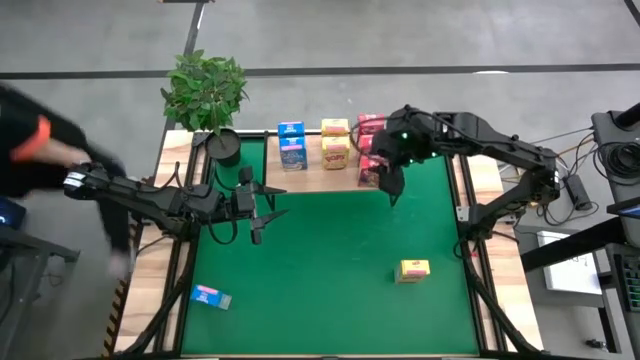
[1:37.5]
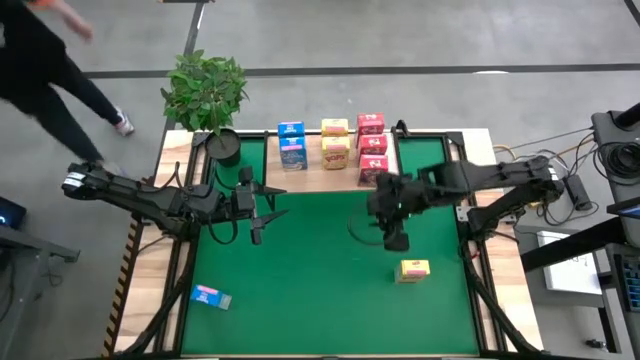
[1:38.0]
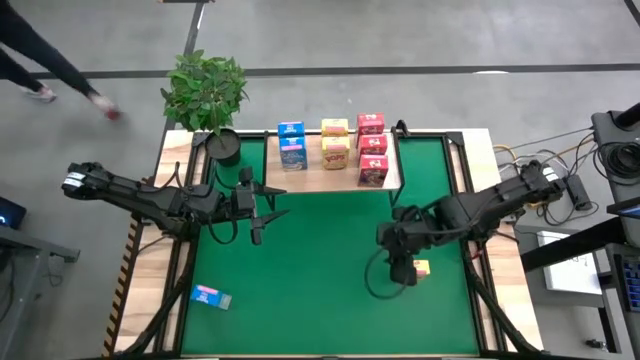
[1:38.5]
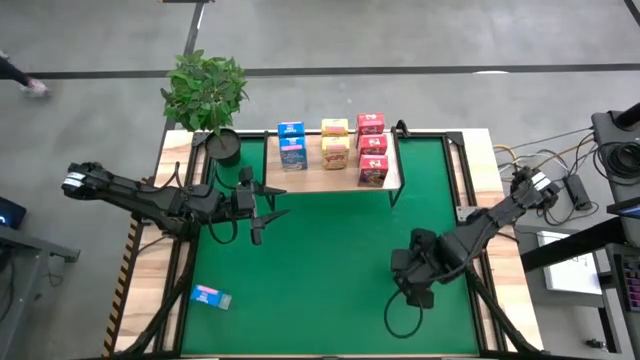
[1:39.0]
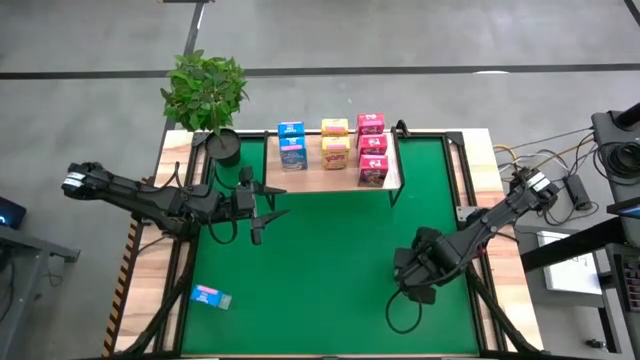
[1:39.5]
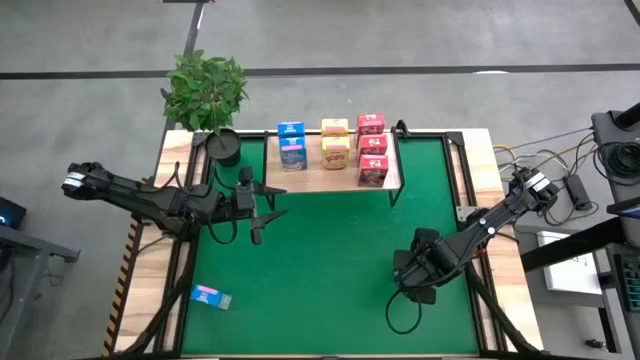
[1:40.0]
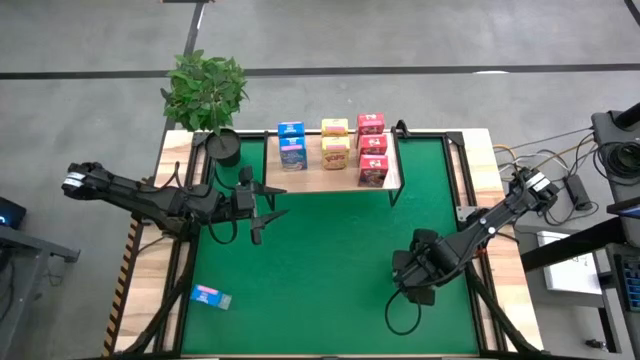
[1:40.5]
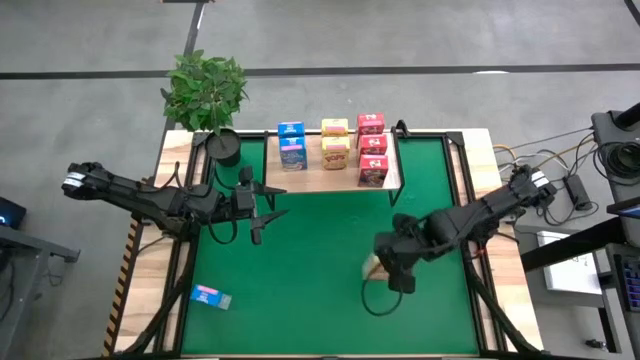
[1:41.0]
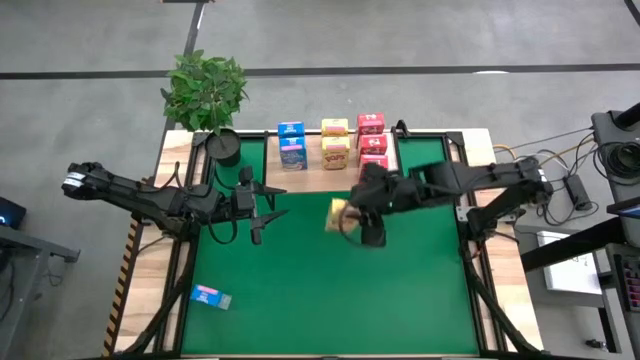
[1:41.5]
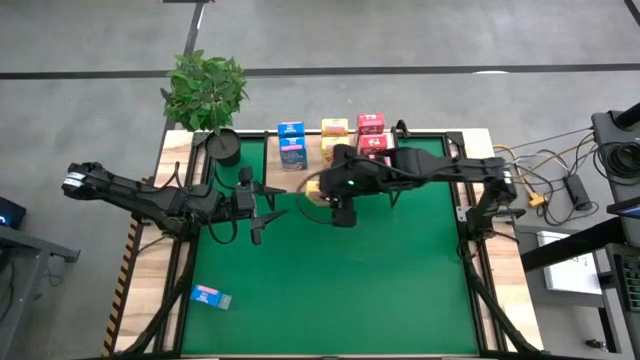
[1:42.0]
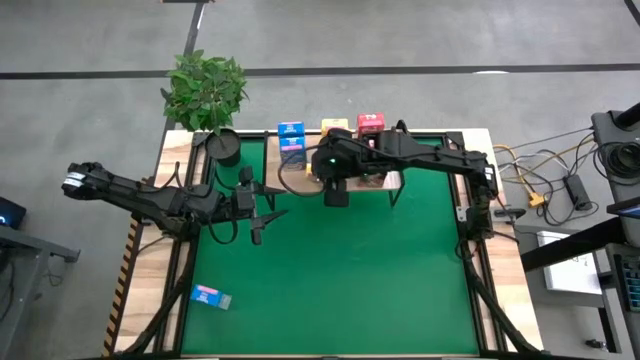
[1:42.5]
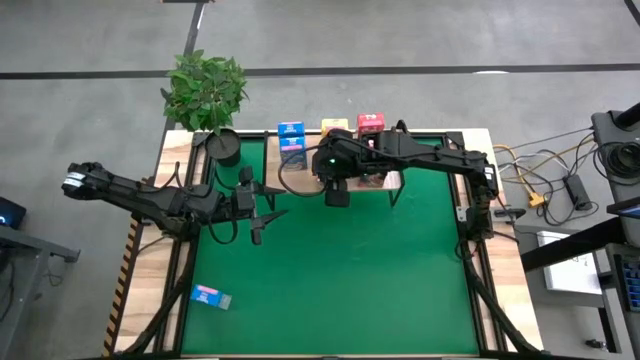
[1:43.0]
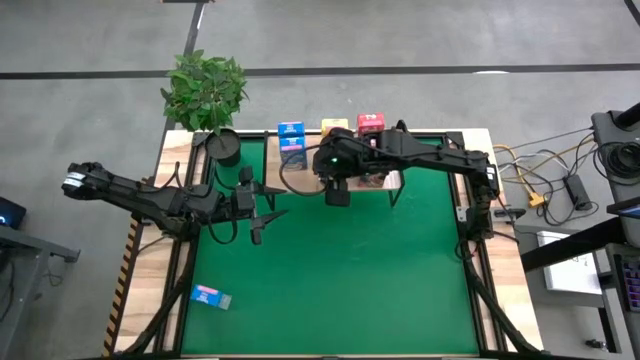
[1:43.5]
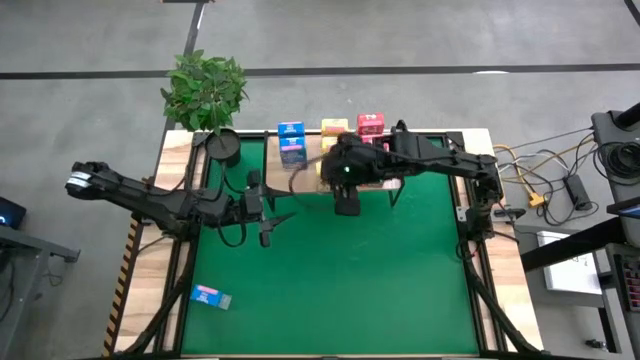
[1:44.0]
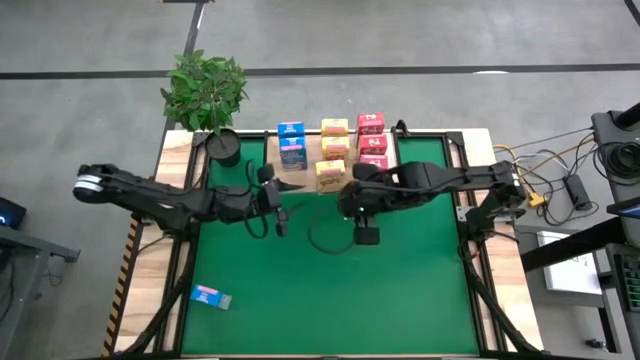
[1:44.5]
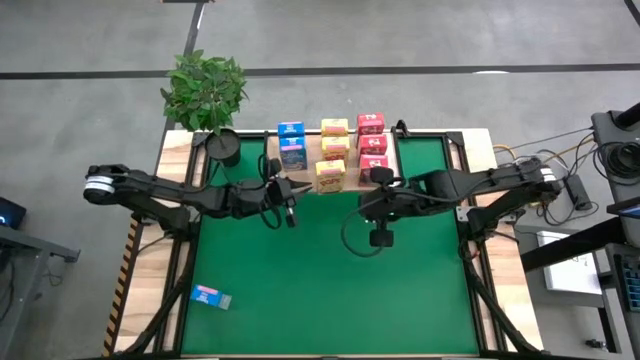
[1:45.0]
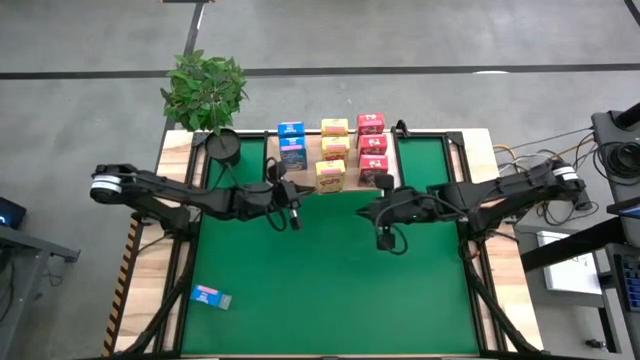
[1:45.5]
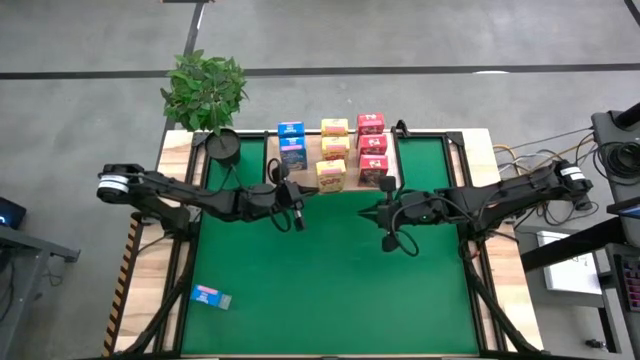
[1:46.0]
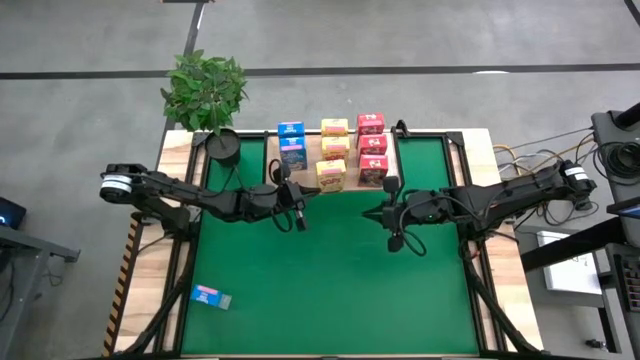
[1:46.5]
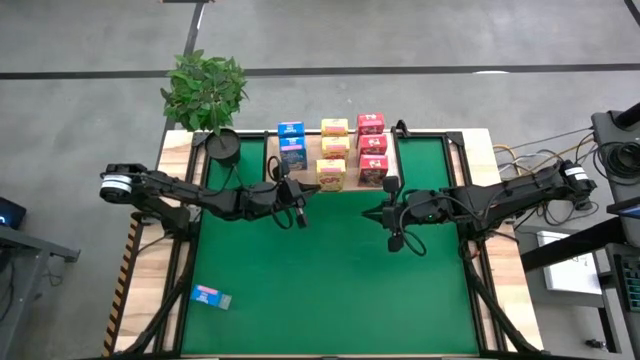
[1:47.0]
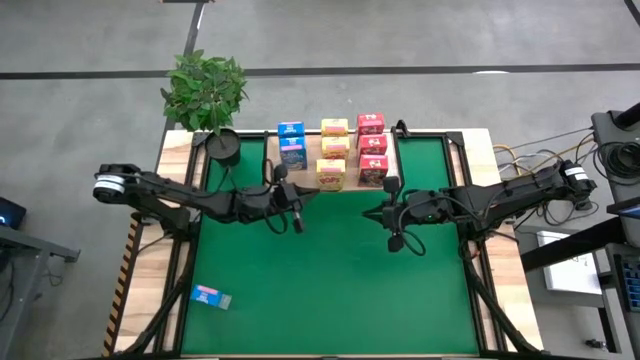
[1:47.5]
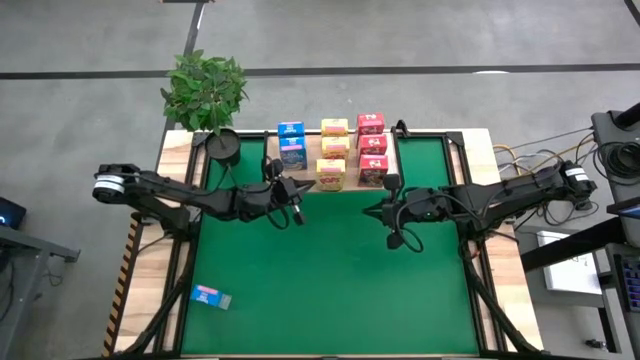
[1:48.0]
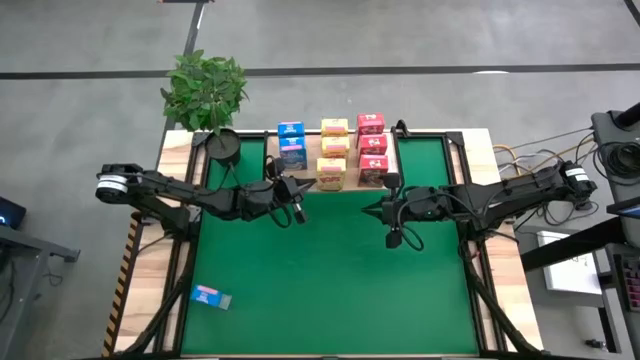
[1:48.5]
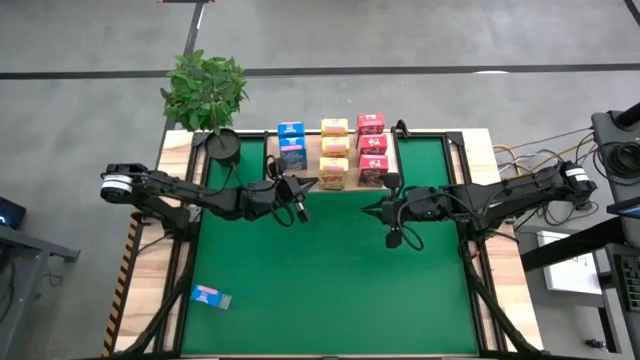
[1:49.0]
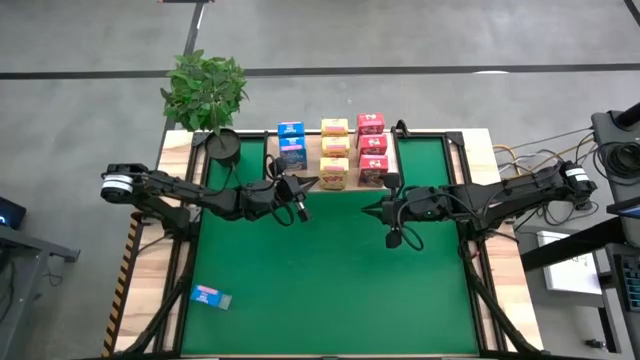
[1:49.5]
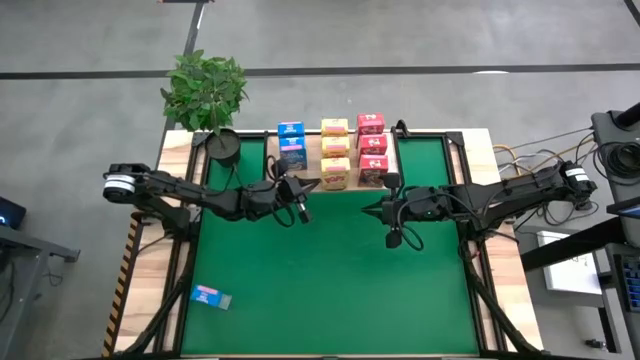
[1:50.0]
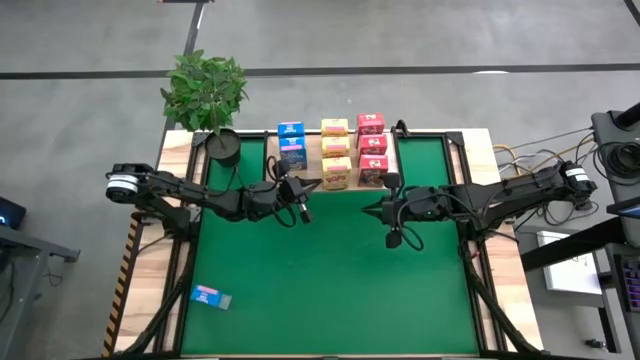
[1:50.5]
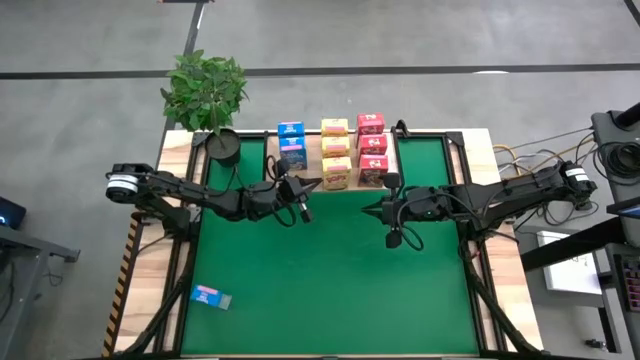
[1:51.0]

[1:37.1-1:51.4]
Task: Stack cereal on shelf
Put the yellow cereal box on the shelf aligned with the other yellow cereal boxes

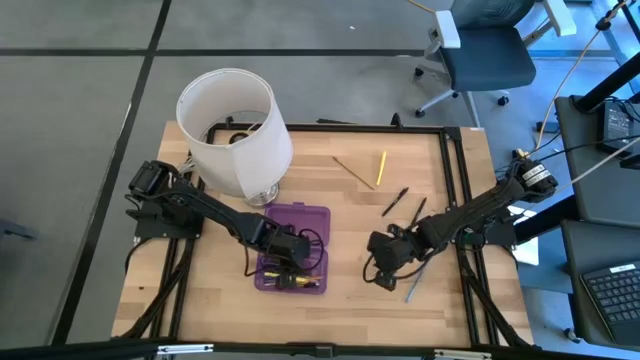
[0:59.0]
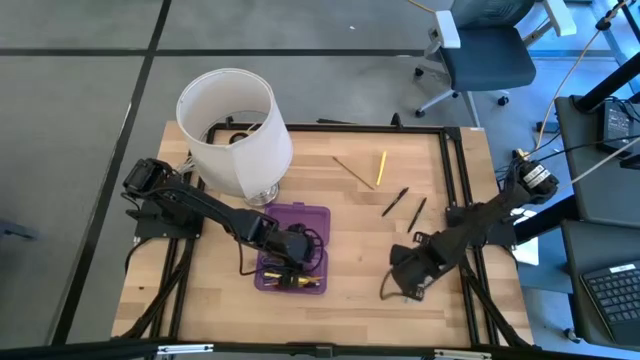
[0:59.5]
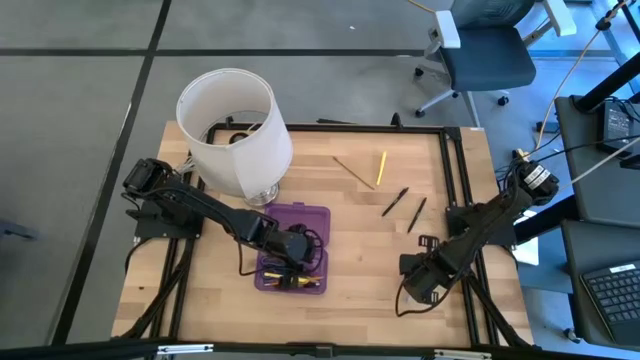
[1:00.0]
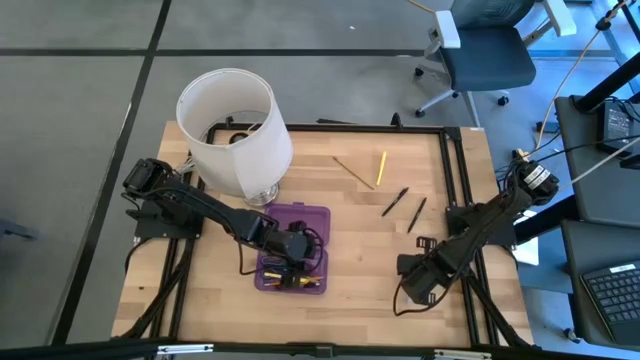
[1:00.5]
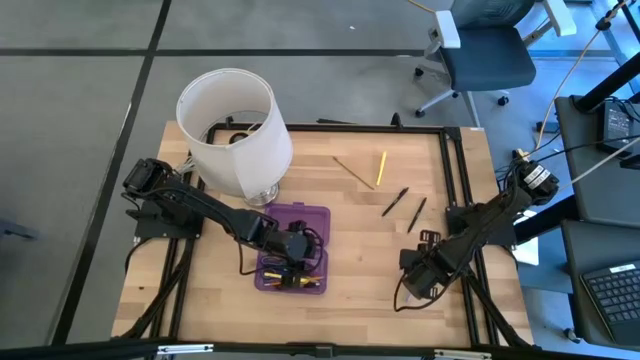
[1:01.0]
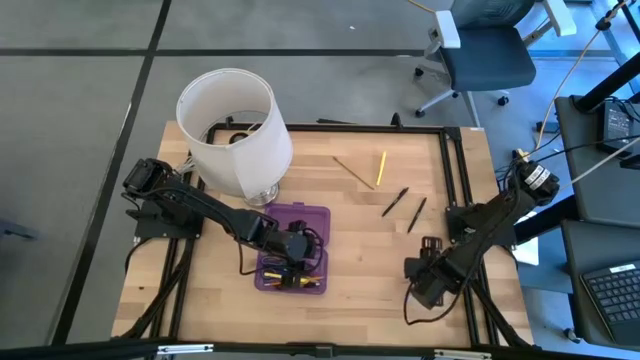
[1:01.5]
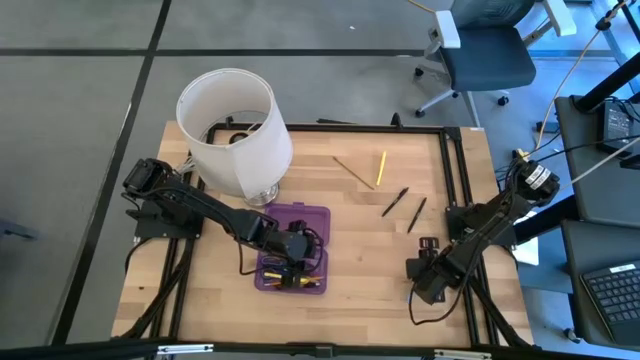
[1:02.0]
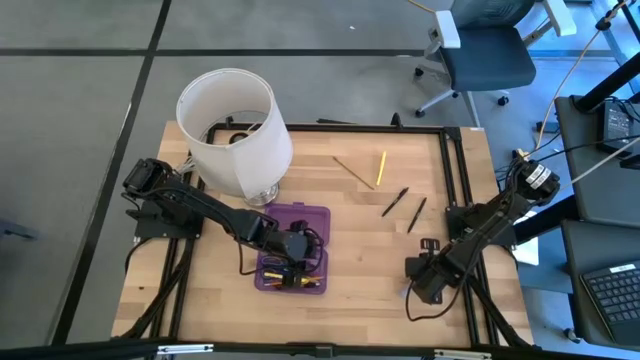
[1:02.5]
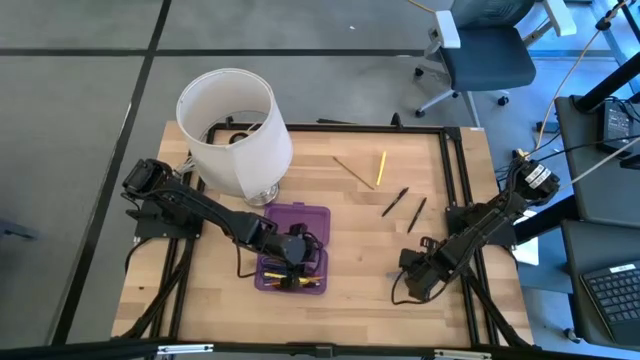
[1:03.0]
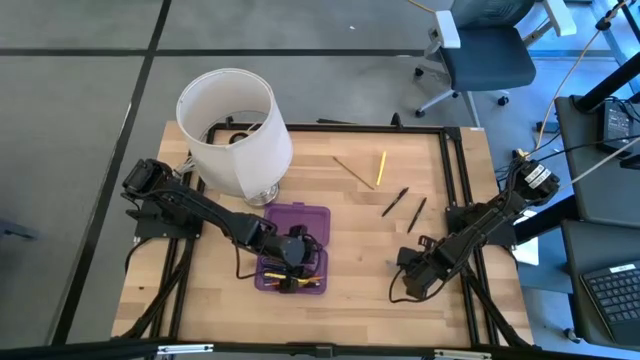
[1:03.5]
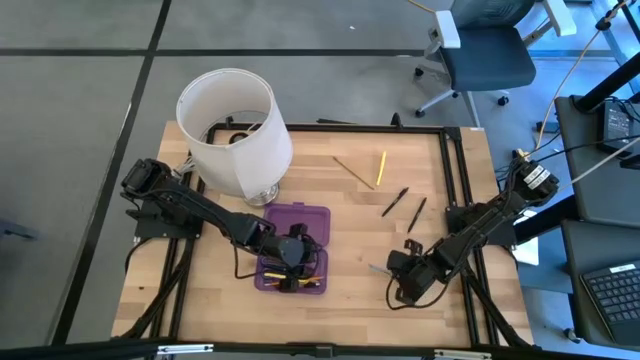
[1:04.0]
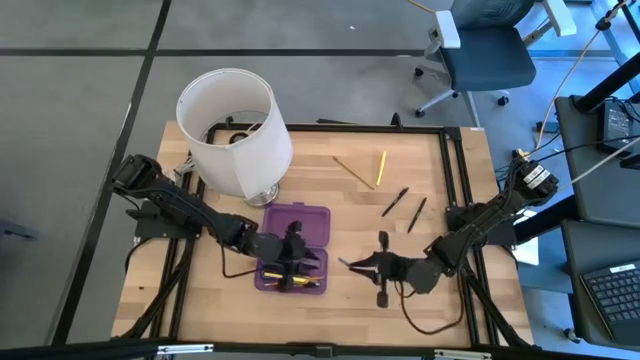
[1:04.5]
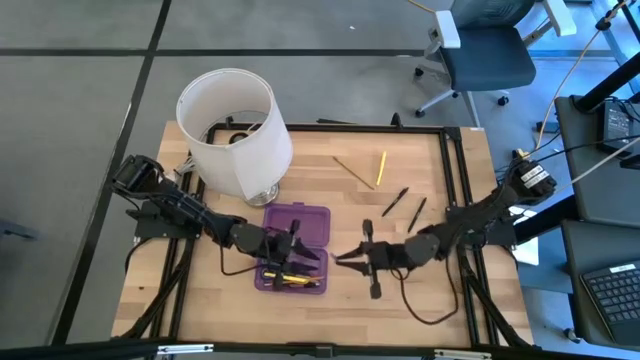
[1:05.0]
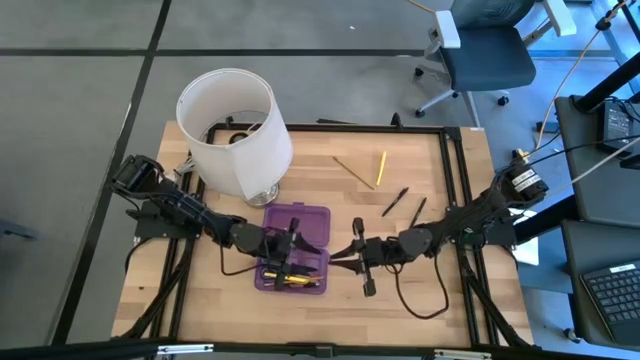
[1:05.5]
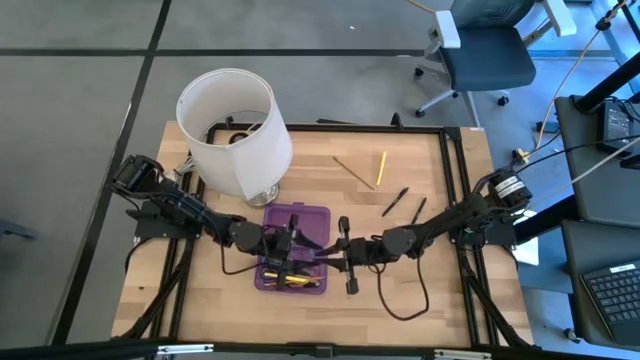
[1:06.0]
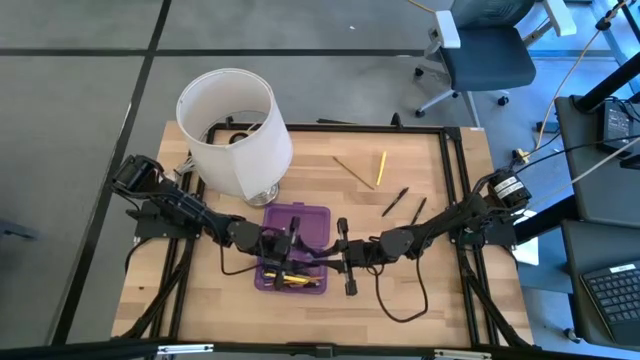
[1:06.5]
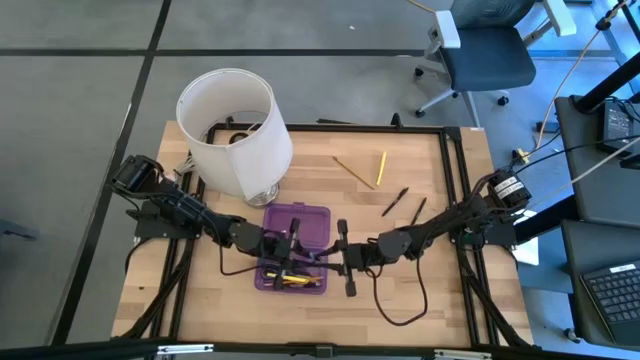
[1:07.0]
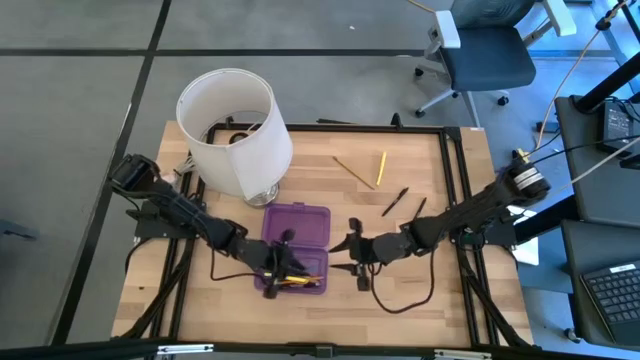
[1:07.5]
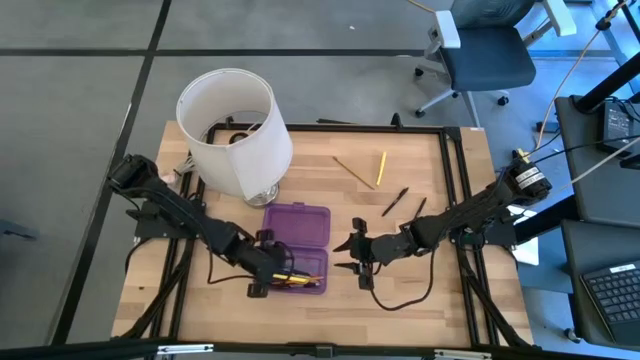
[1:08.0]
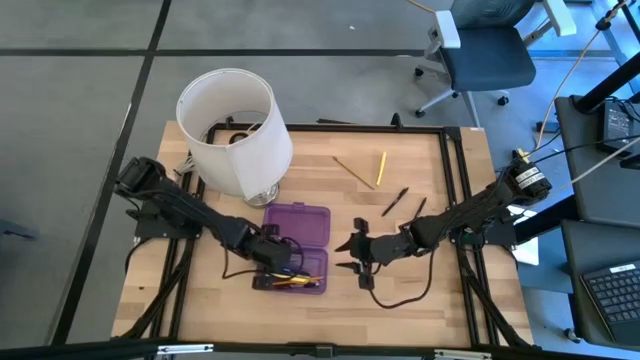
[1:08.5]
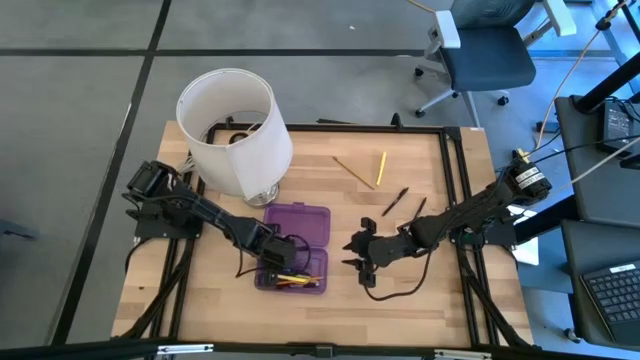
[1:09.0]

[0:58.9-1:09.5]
Task: Pick & place school supplies into a supply box
Put the blue pen into the purple supply box
